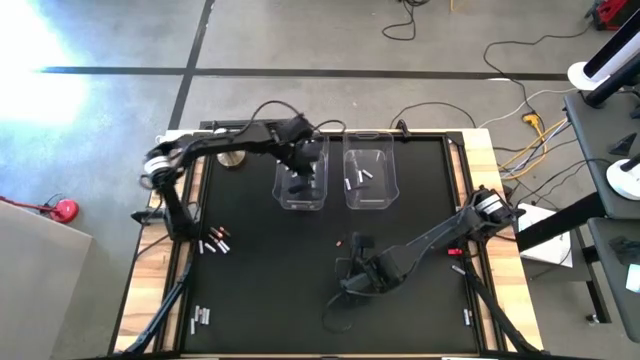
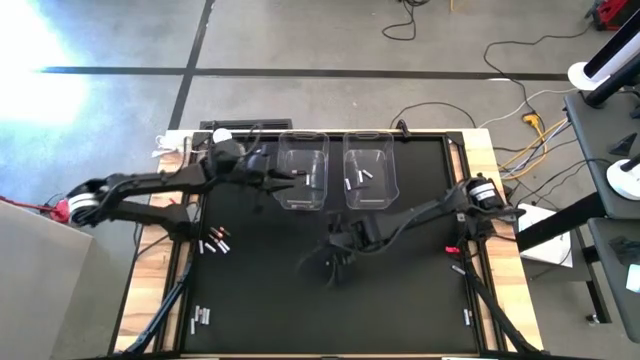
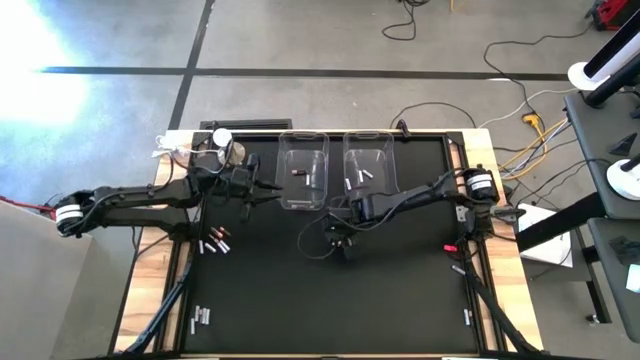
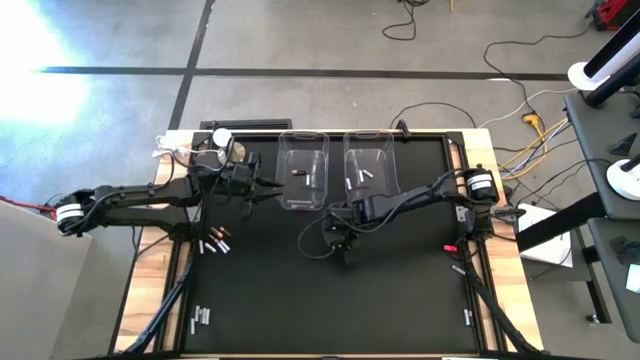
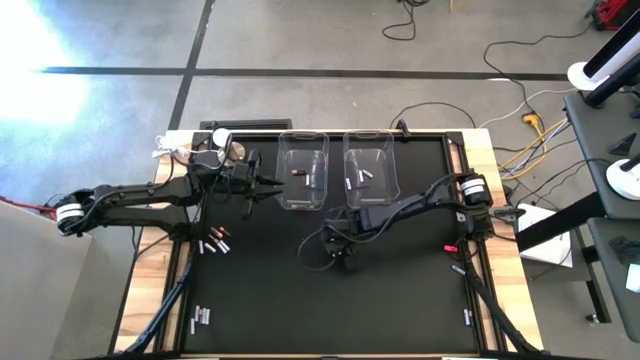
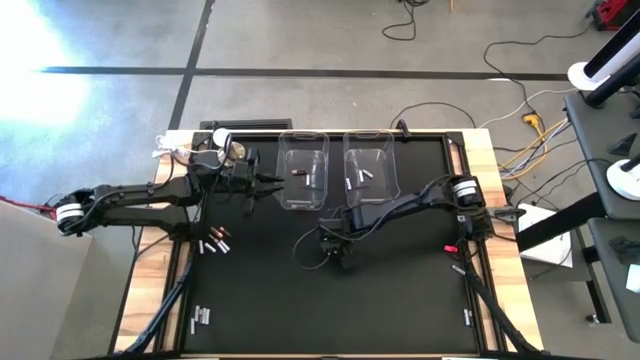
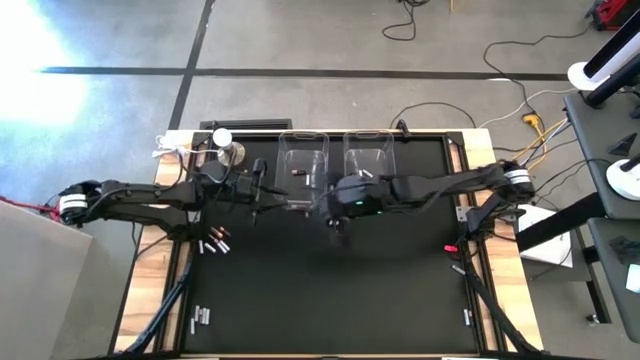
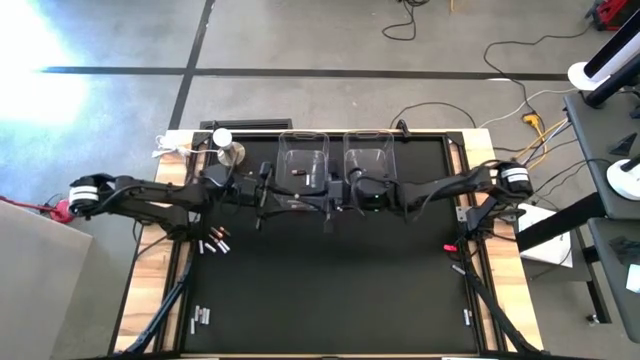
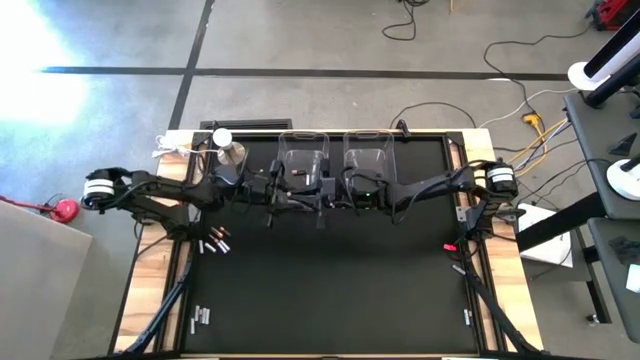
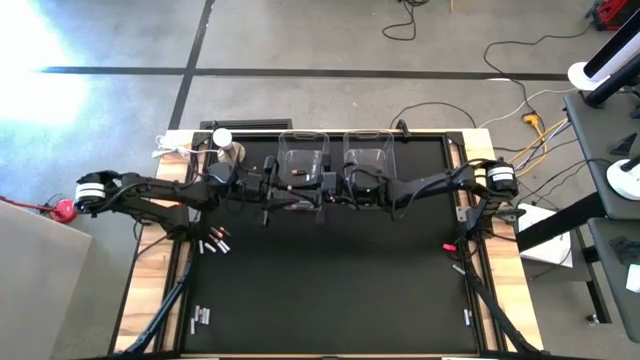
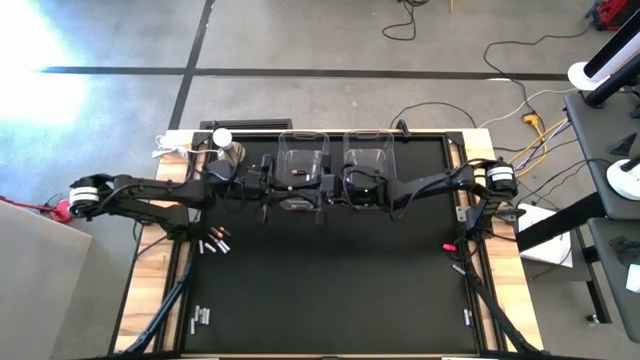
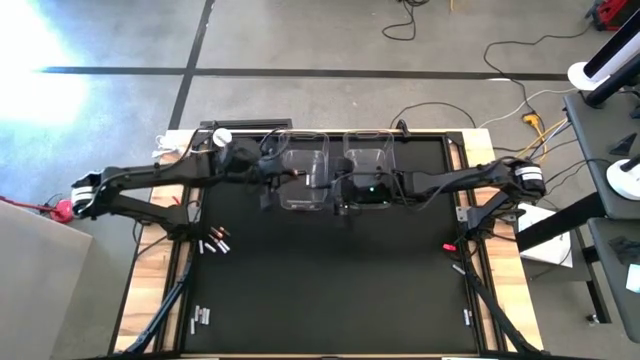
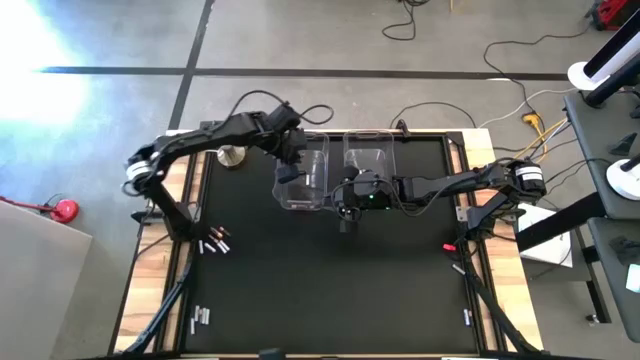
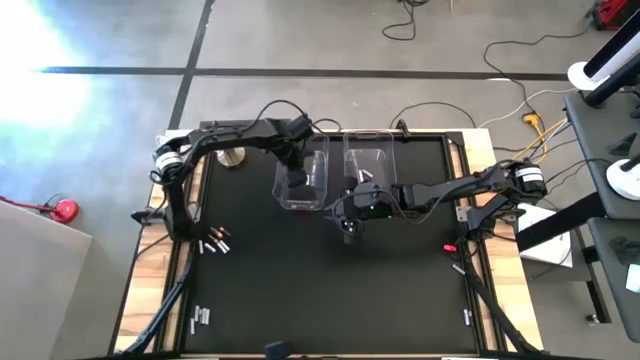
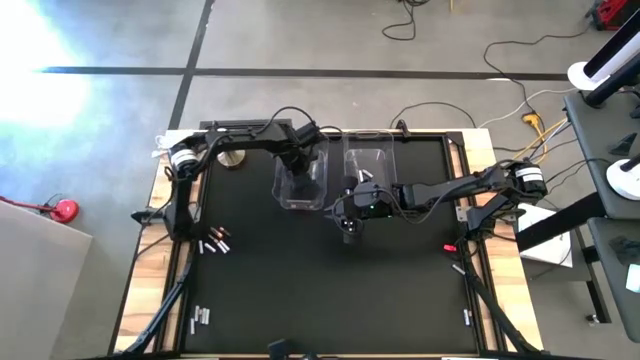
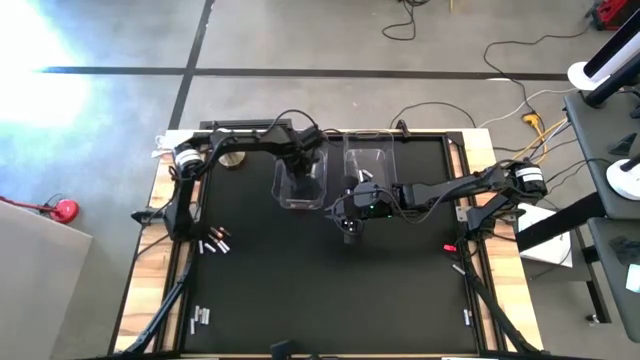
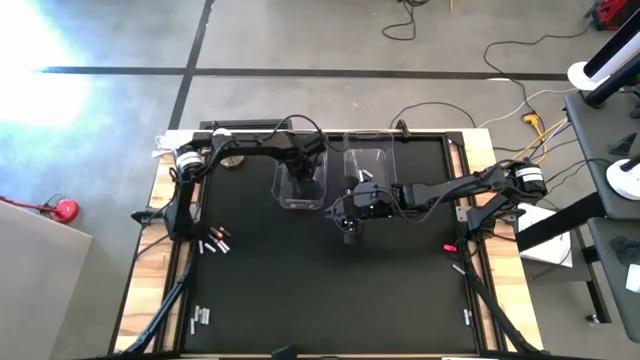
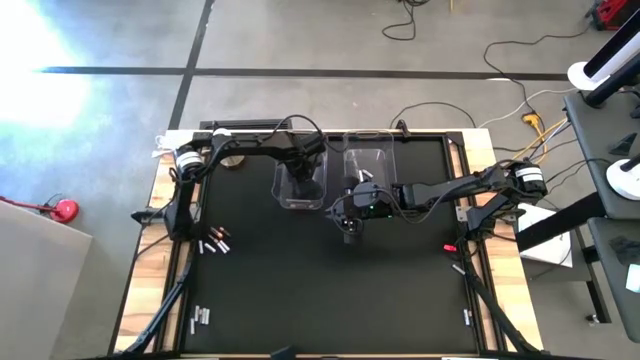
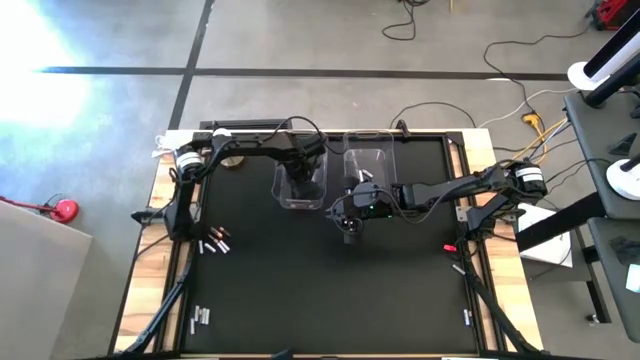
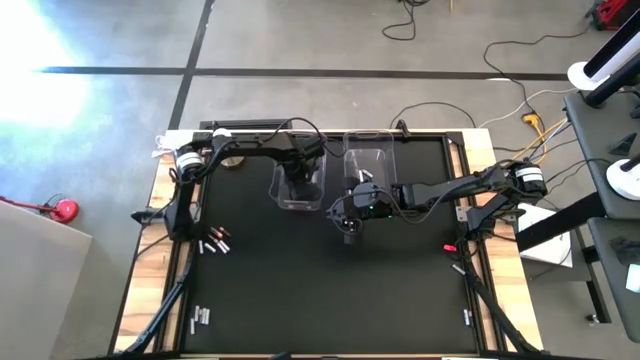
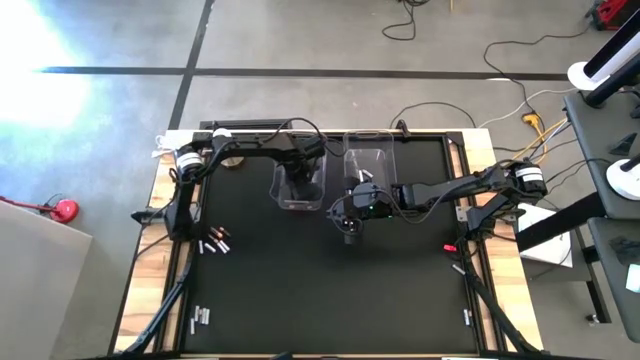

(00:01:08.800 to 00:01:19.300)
Task: Sort batteries
Put the black battery into the left transparent bin

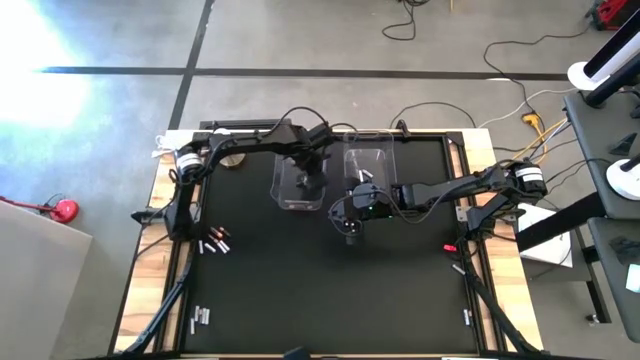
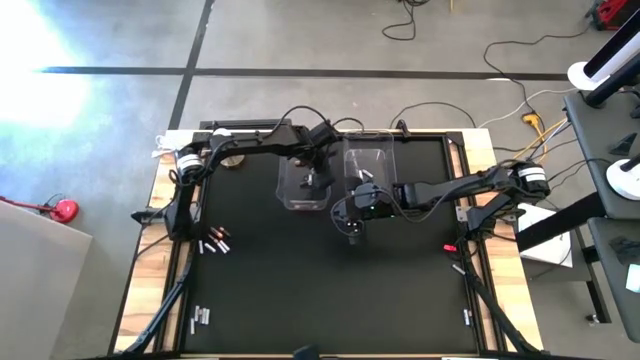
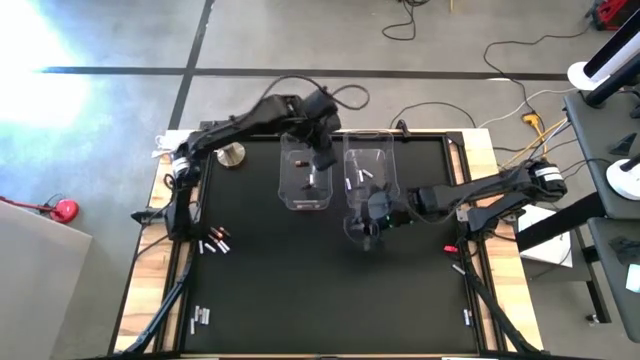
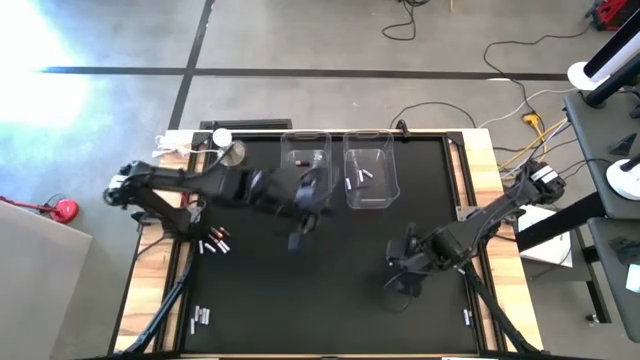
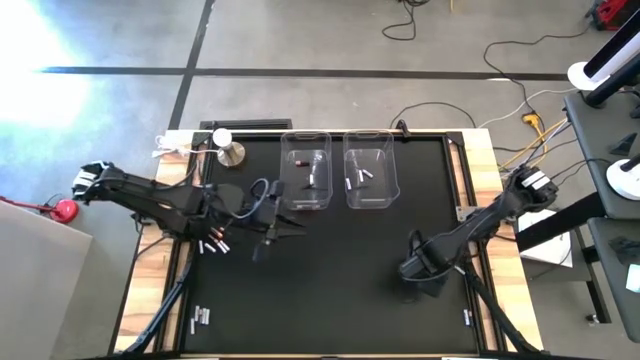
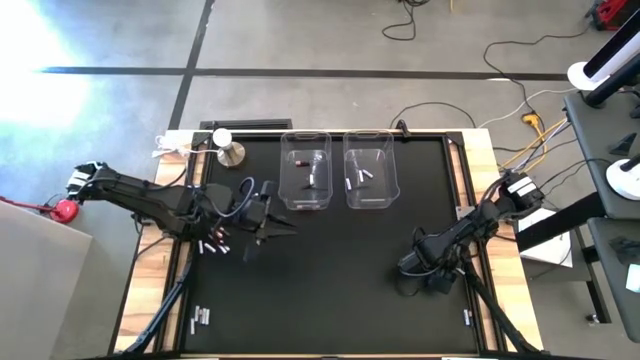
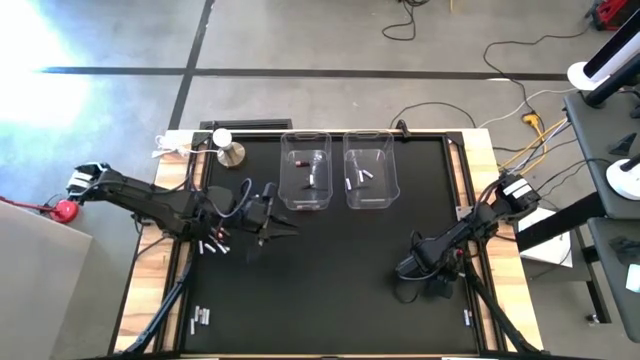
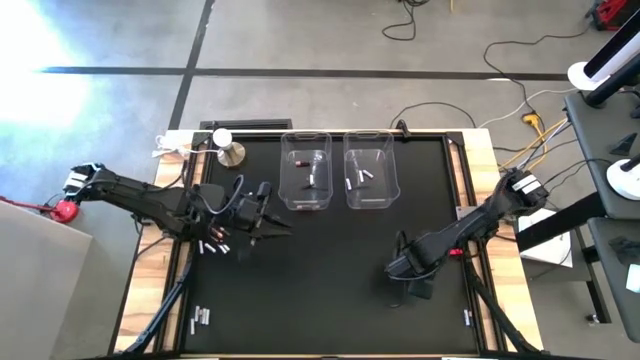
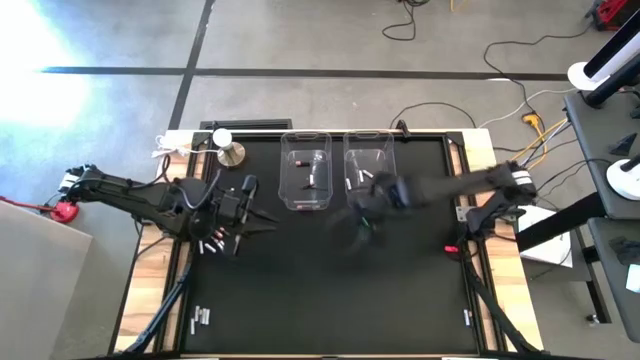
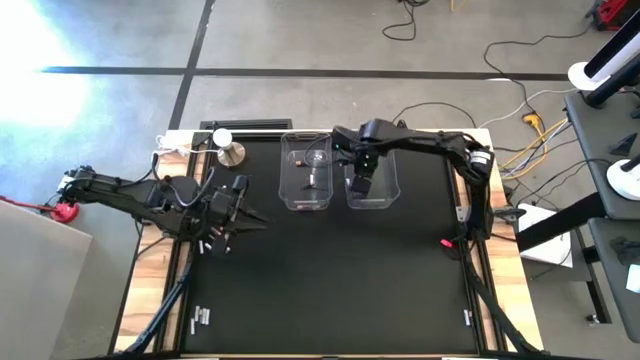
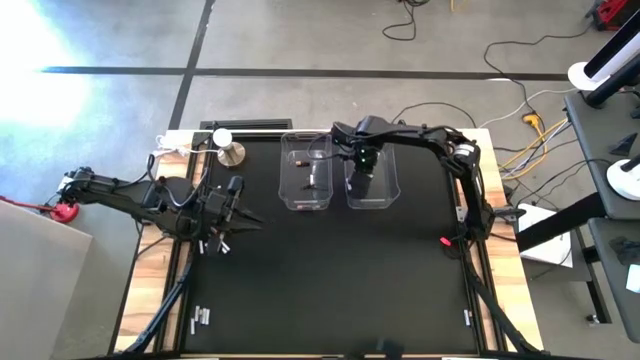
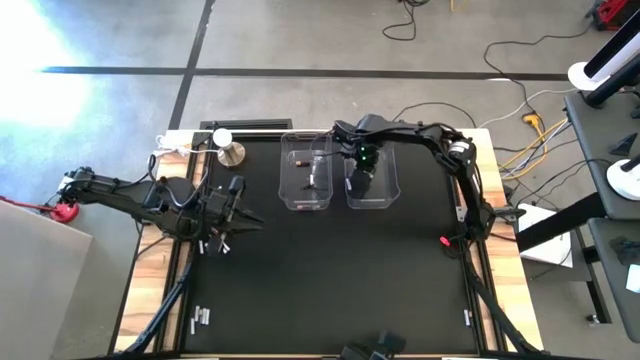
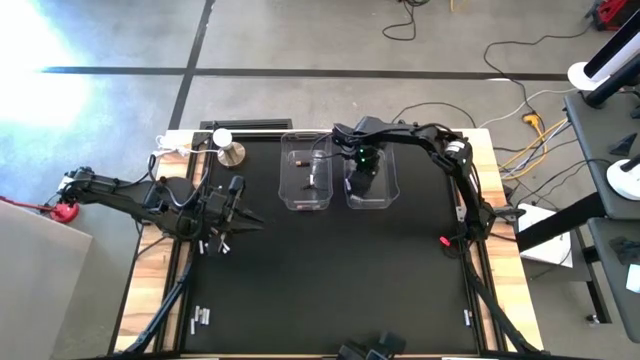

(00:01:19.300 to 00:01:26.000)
Put the white battery into the right transparent bin

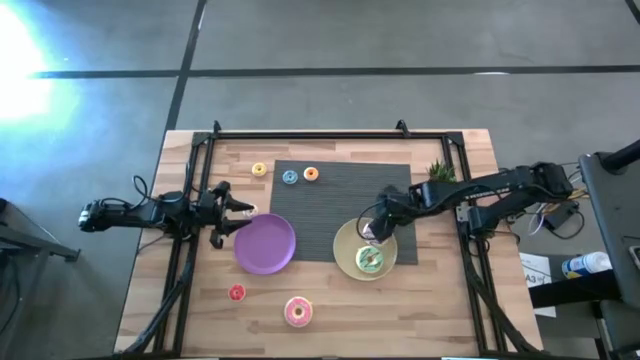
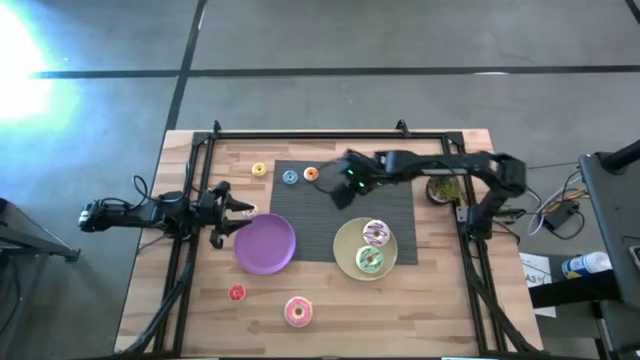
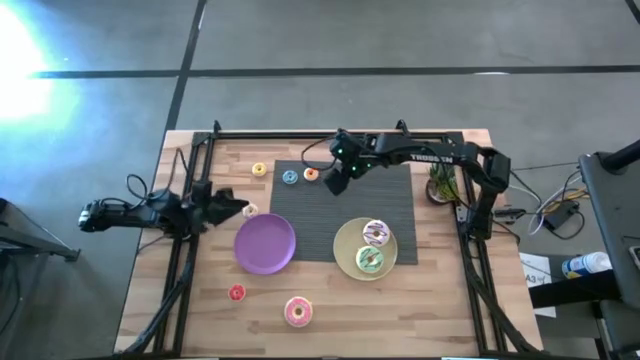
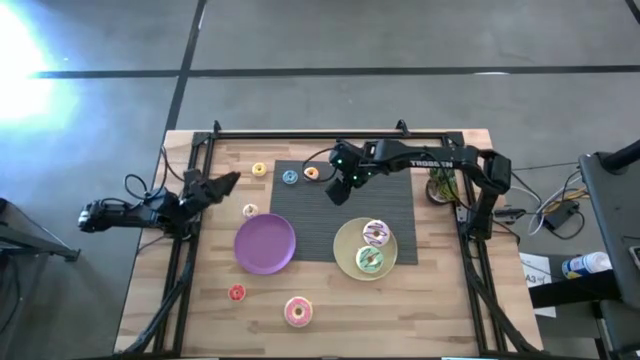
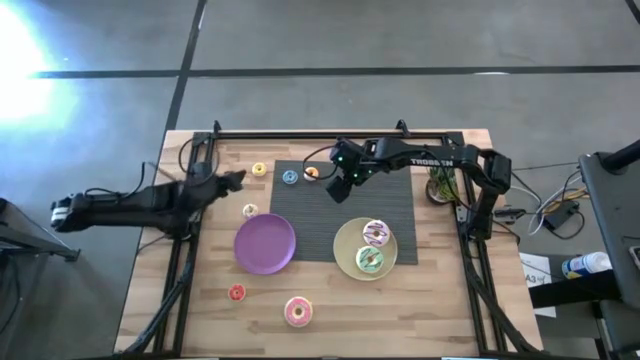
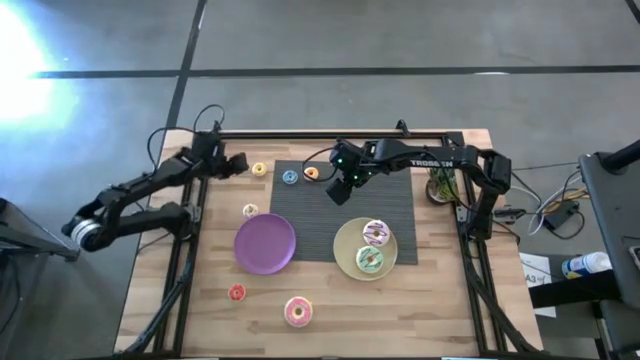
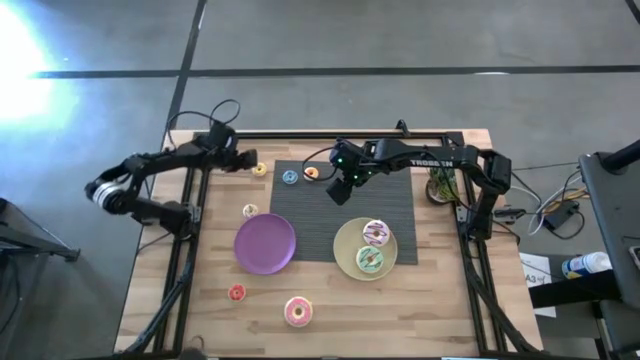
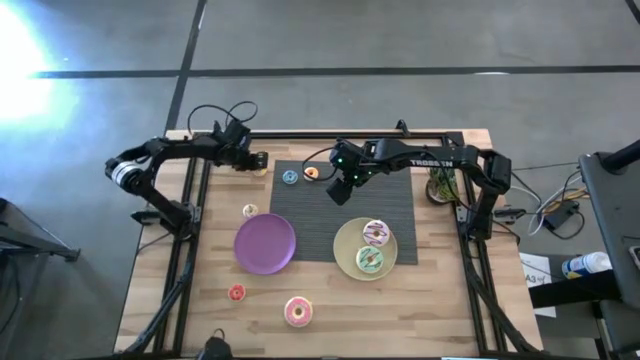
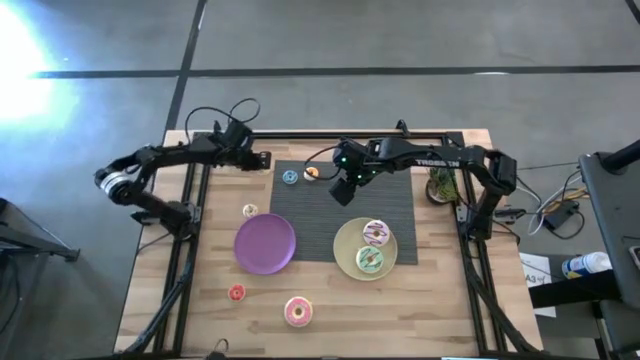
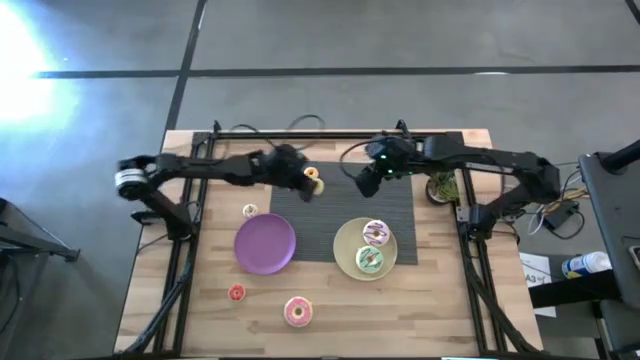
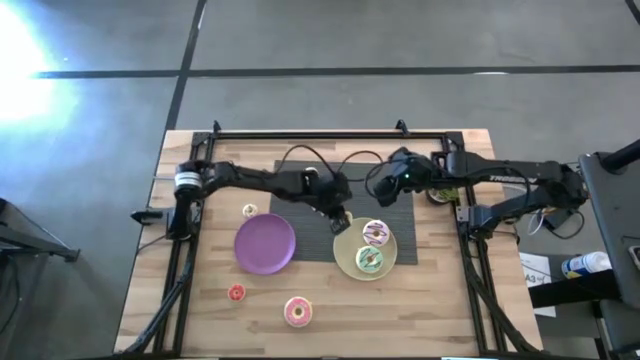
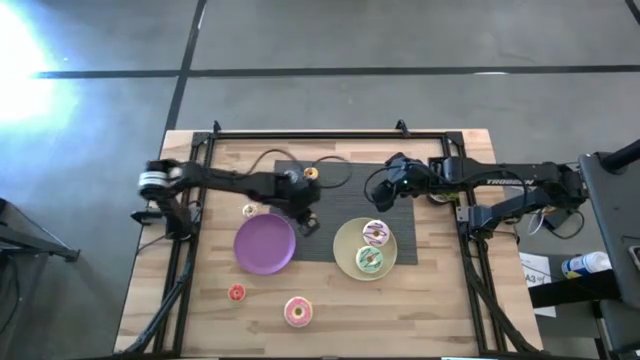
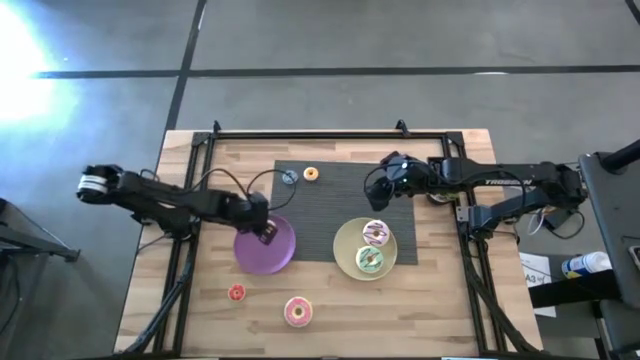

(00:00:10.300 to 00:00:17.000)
Task: Pick & Place donuts
Put the small yellow donut on the purple plate
